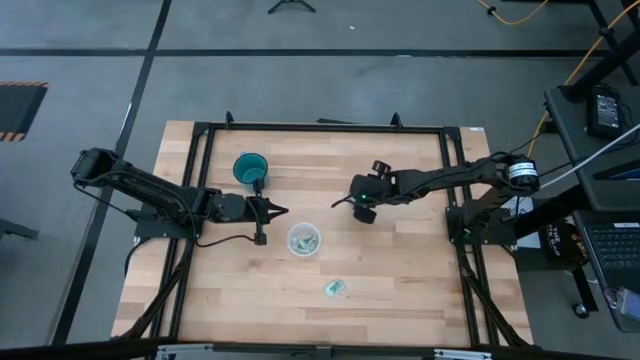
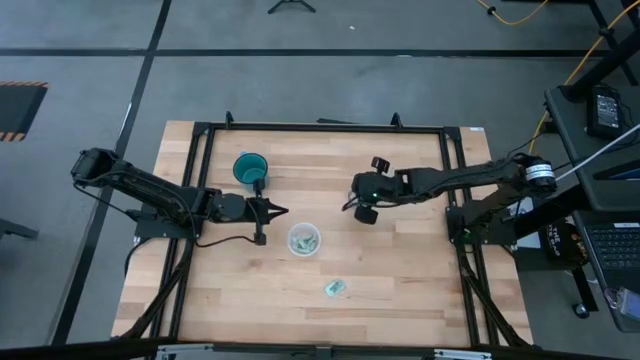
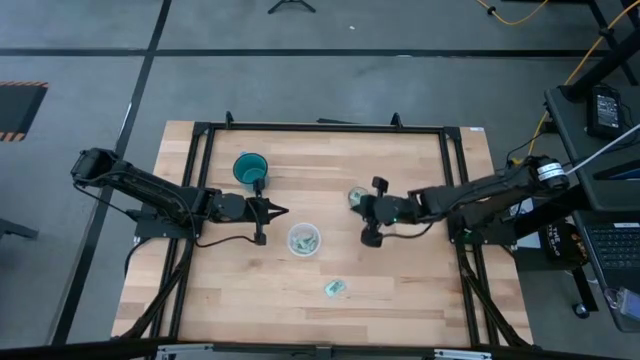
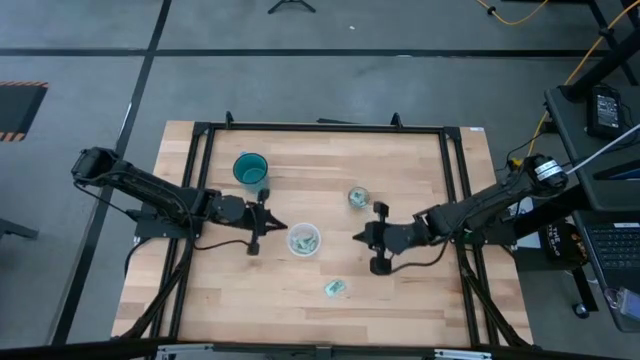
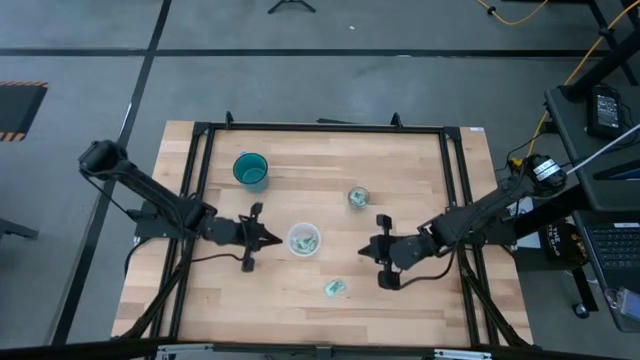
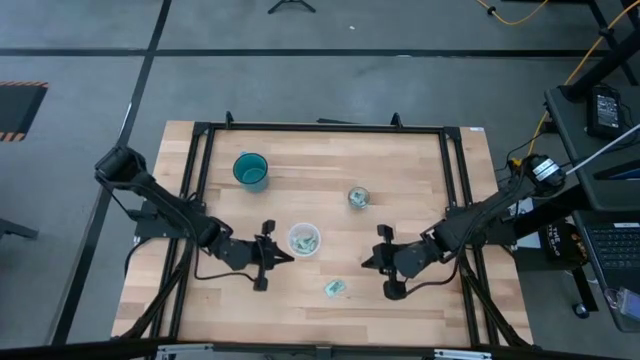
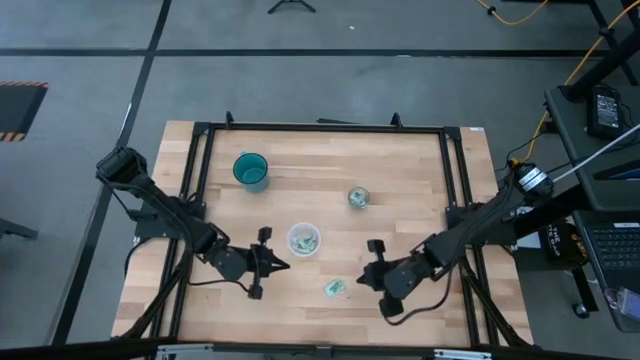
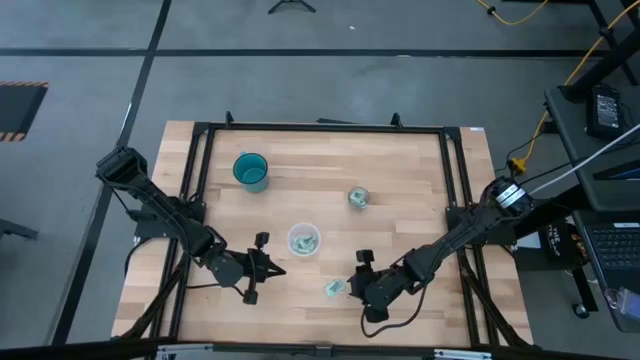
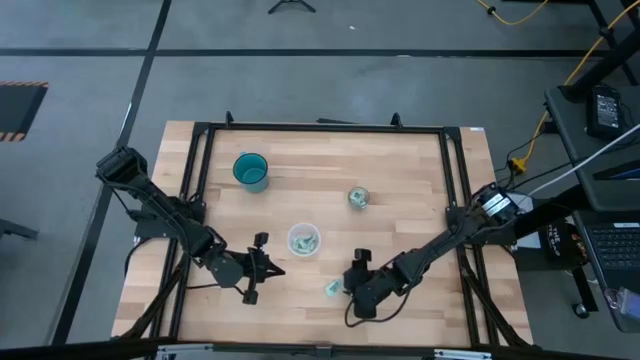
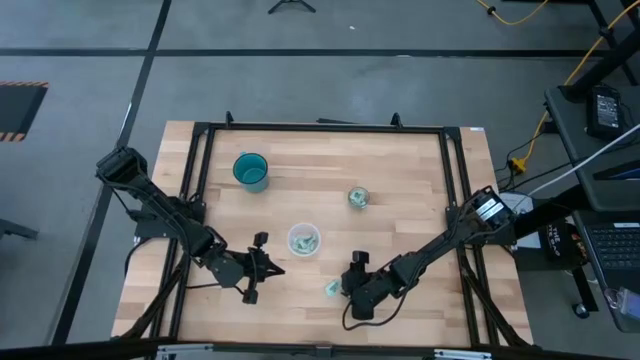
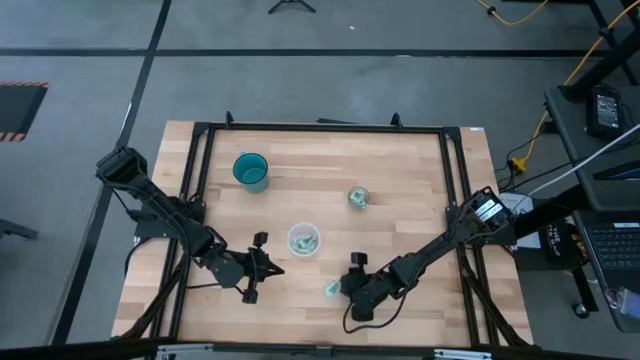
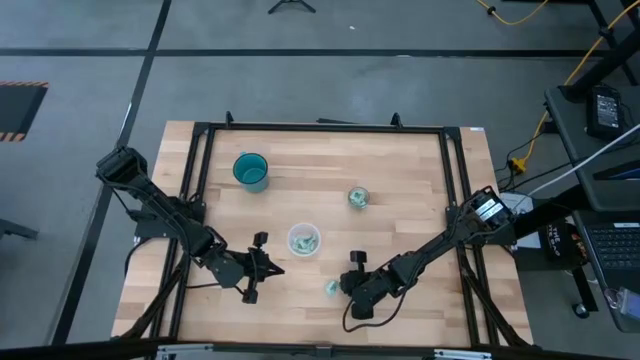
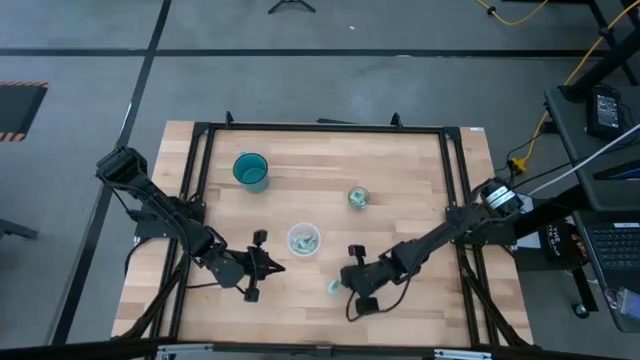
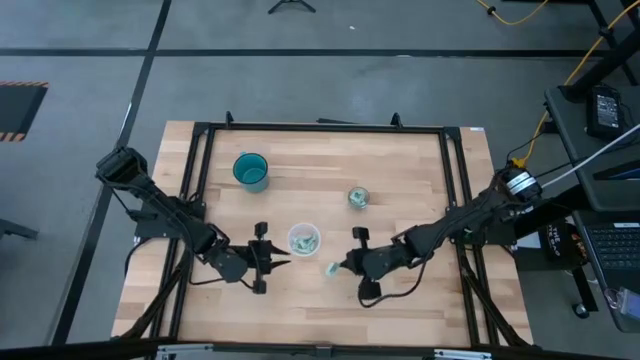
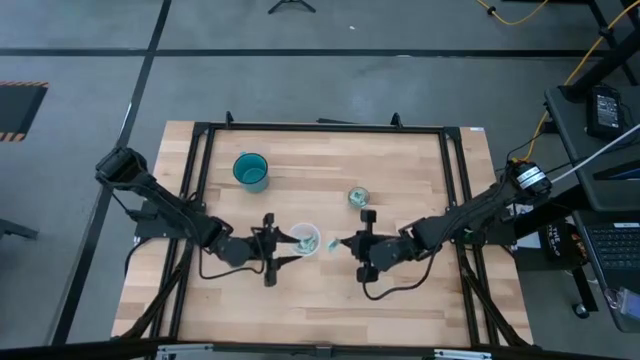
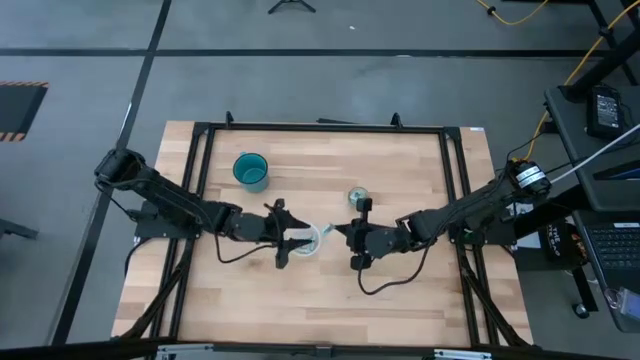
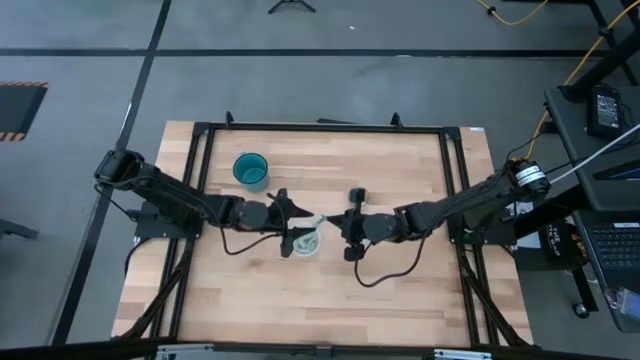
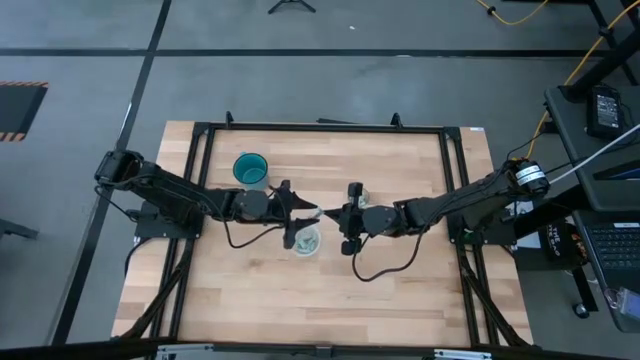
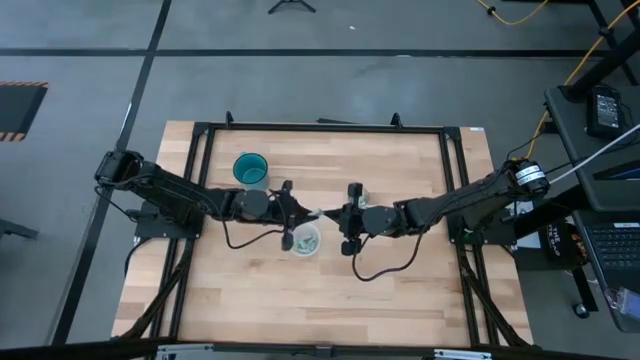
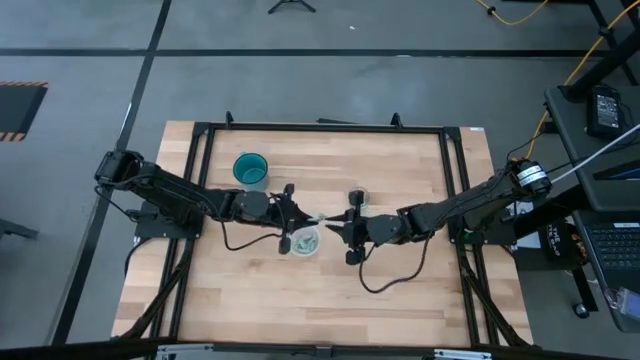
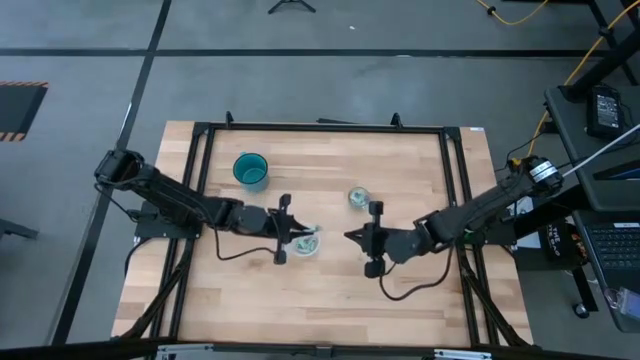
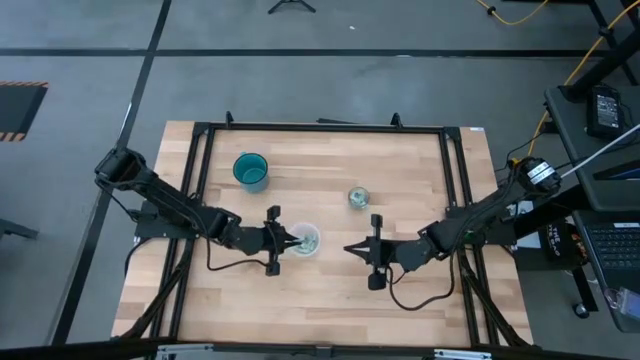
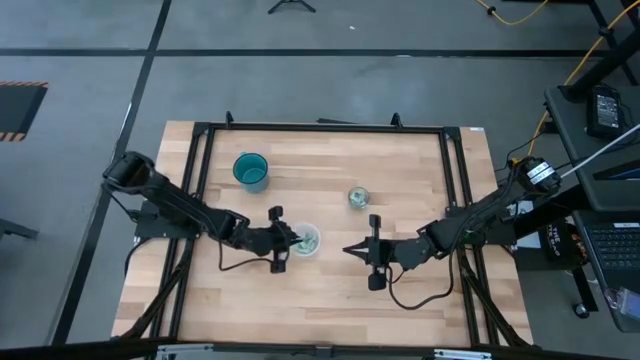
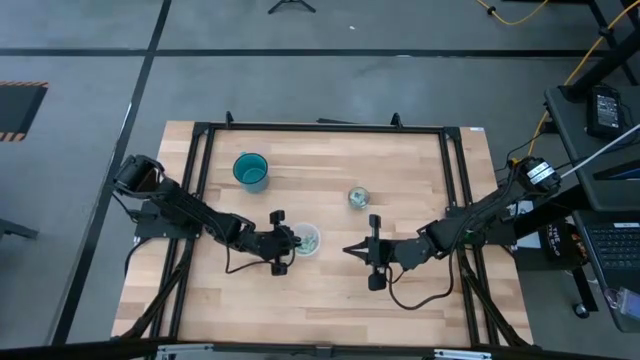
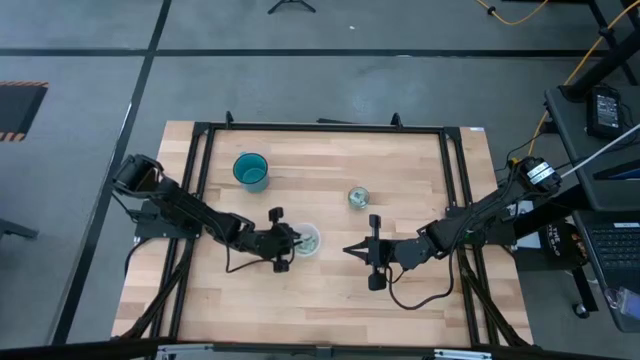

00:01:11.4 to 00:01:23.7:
Task: Pick and place Stevia / Truvia into bins
Put the white stevia packet into the transparent plastic container

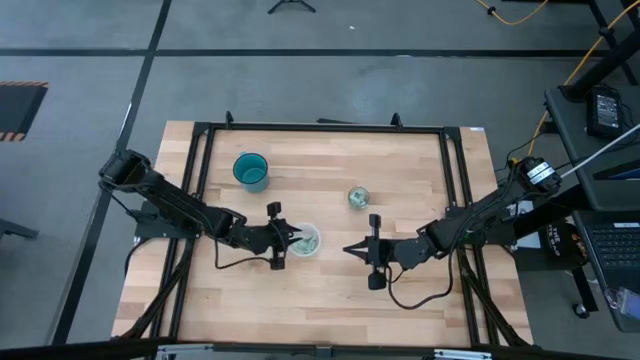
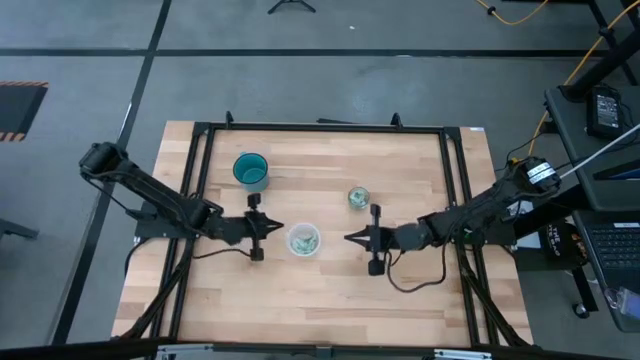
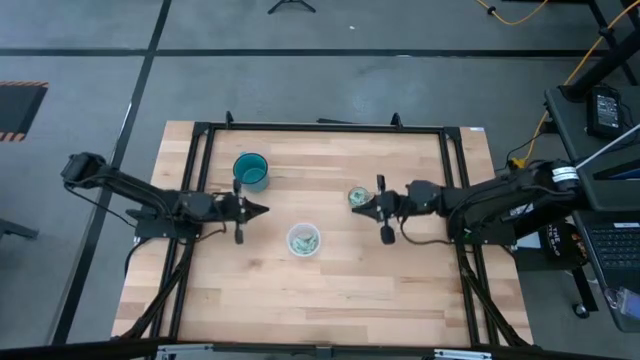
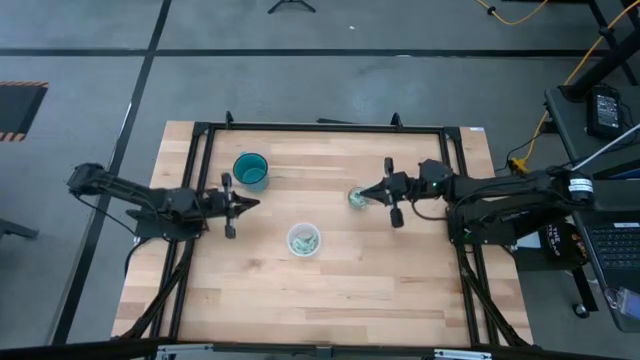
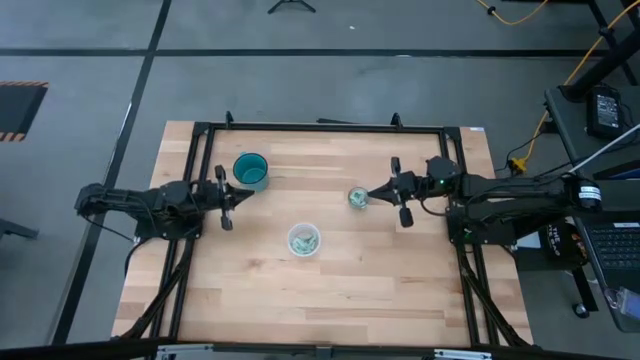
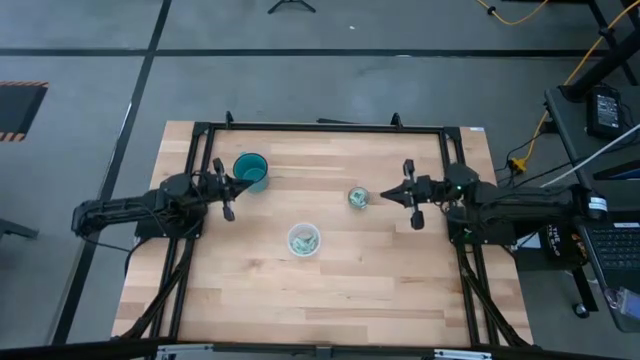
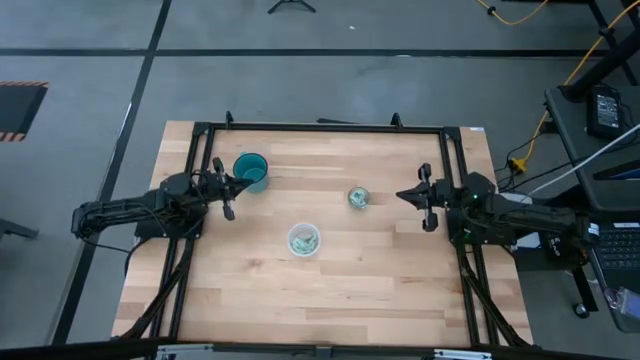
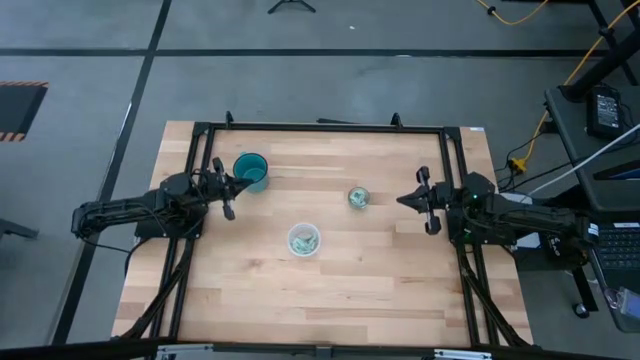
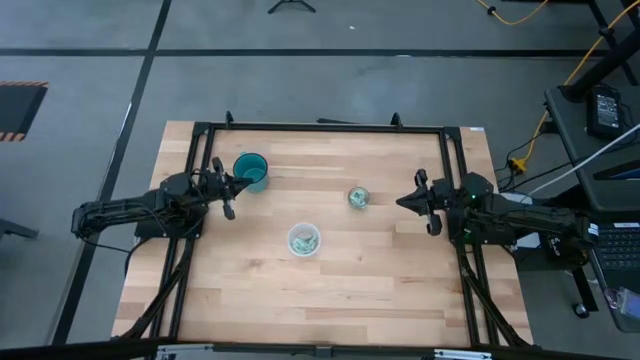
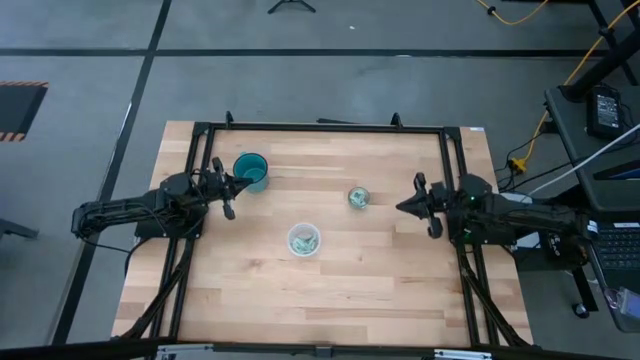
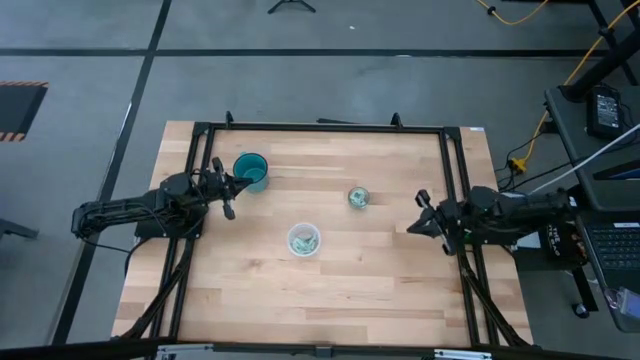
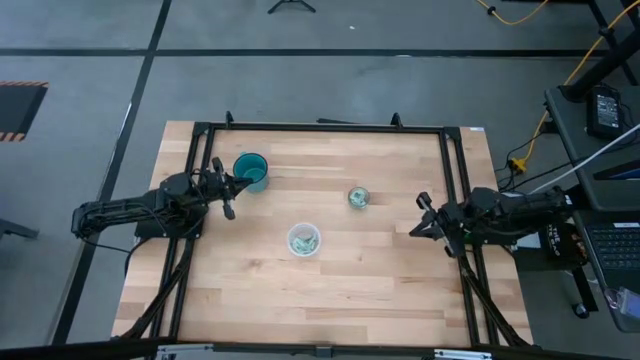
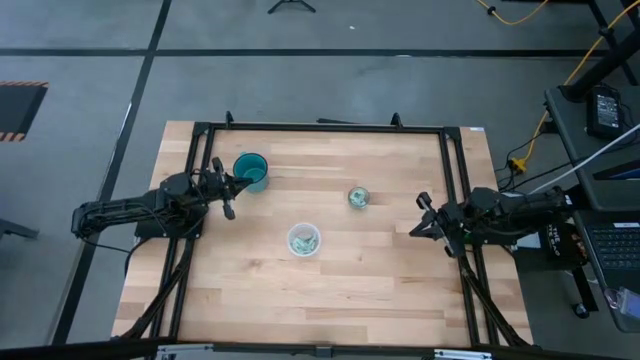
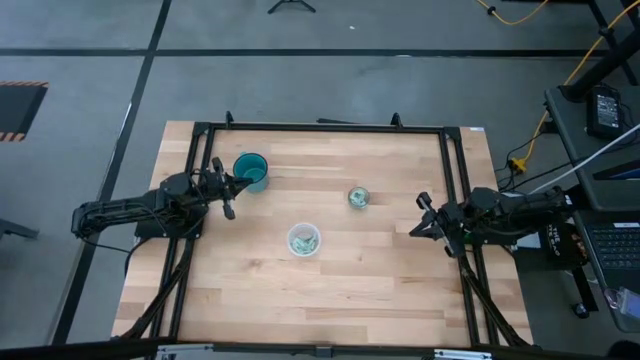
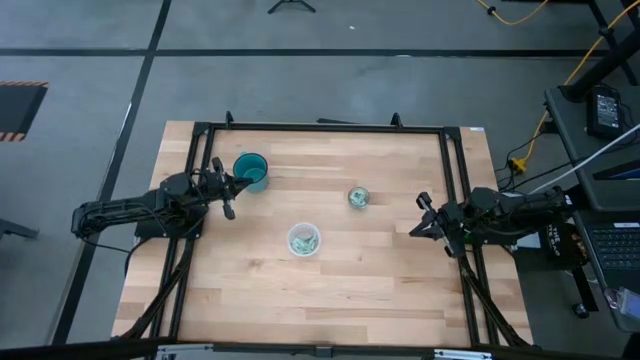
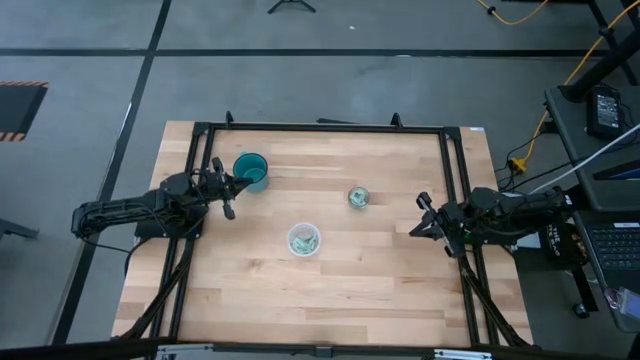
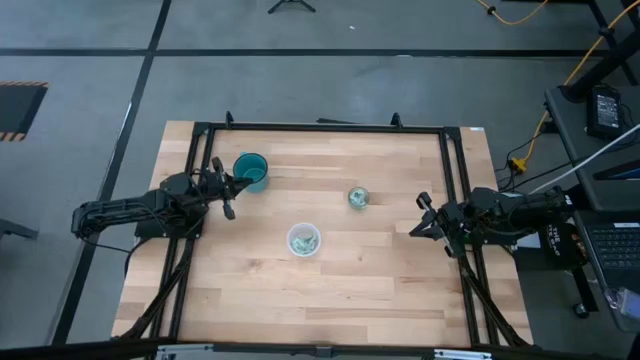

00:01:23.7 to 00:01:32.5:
Return to Home Position

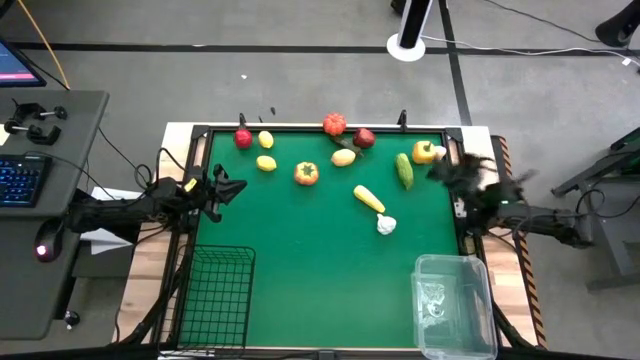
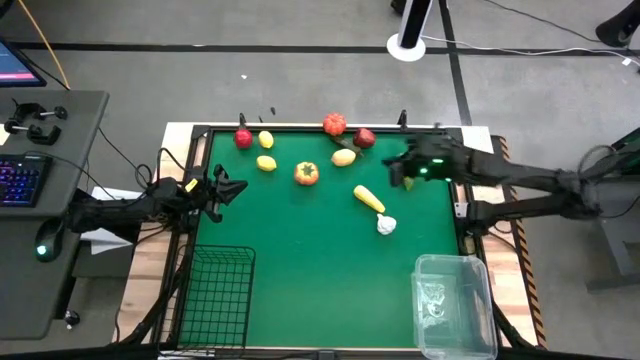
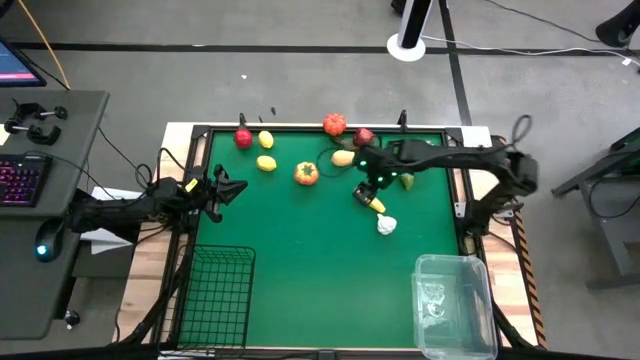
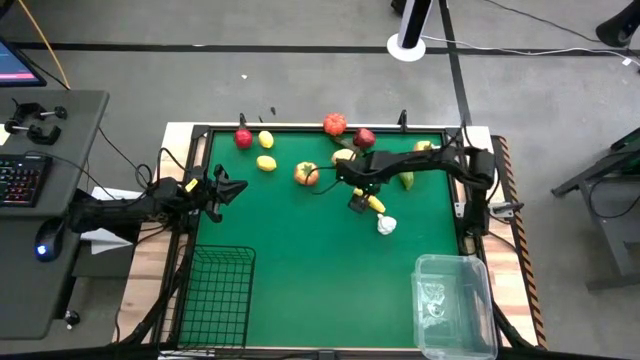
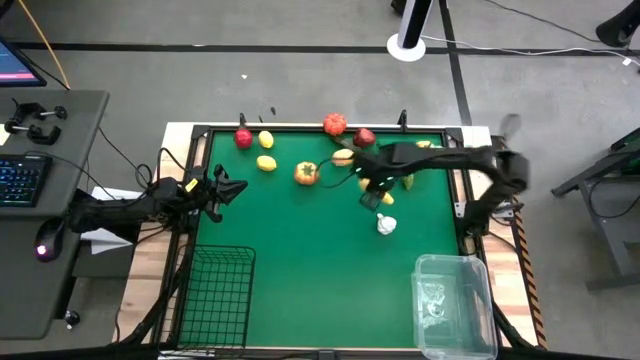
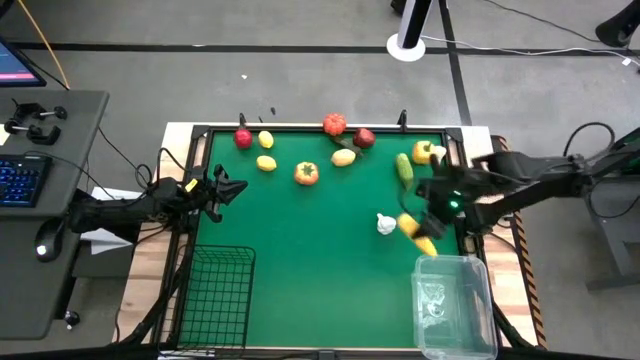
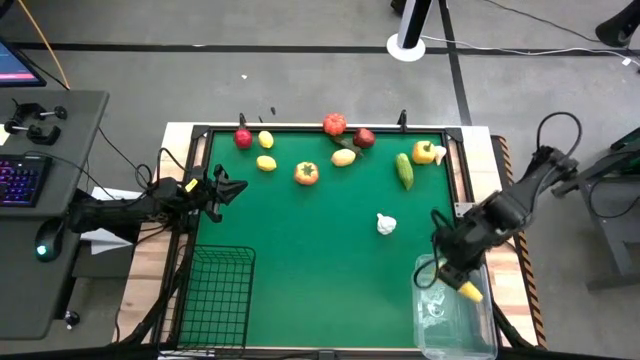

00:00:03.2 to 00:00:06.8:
Task: Sort produce into baskets
Put the yellow corn into the transparent bin
